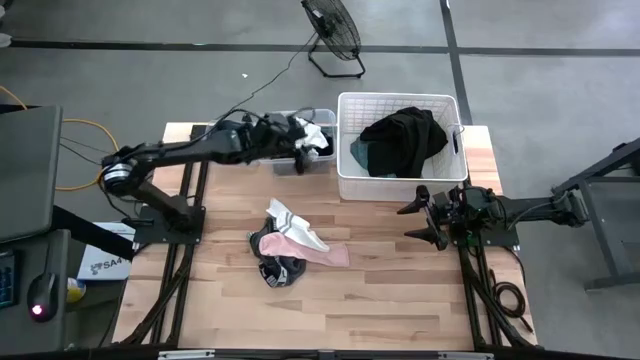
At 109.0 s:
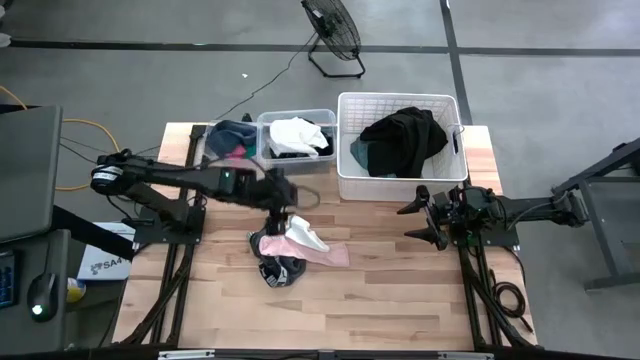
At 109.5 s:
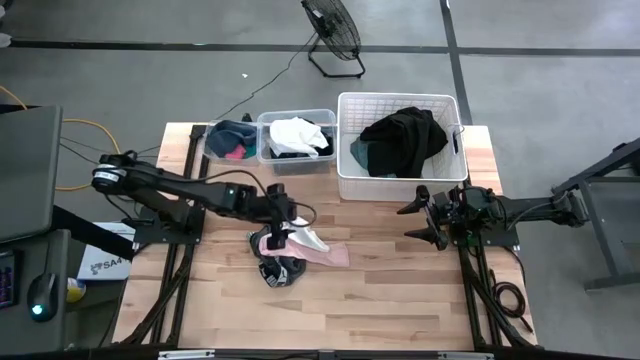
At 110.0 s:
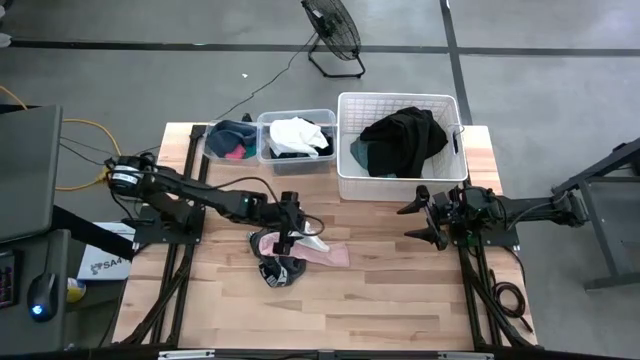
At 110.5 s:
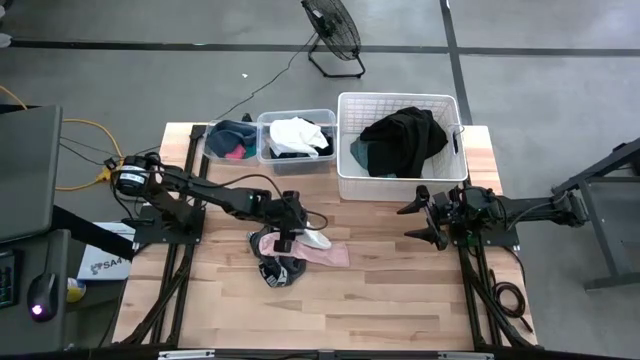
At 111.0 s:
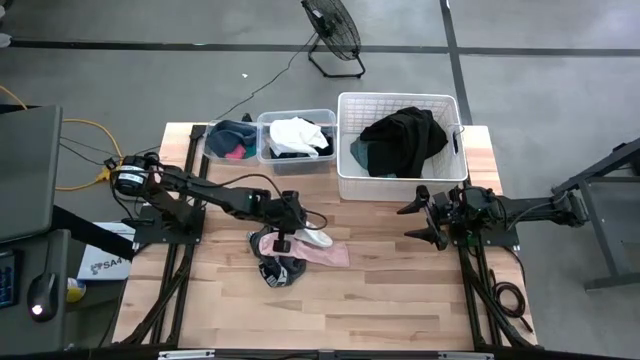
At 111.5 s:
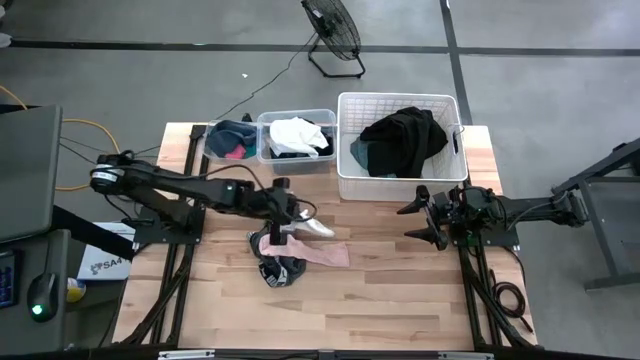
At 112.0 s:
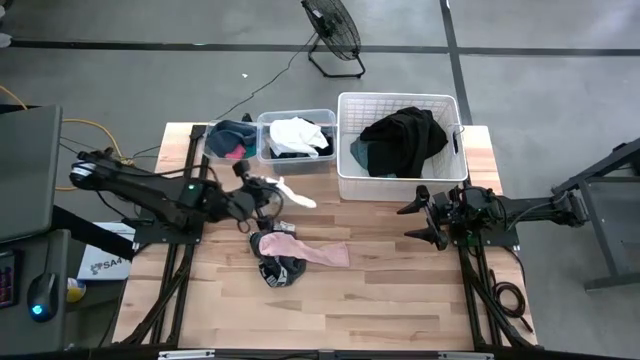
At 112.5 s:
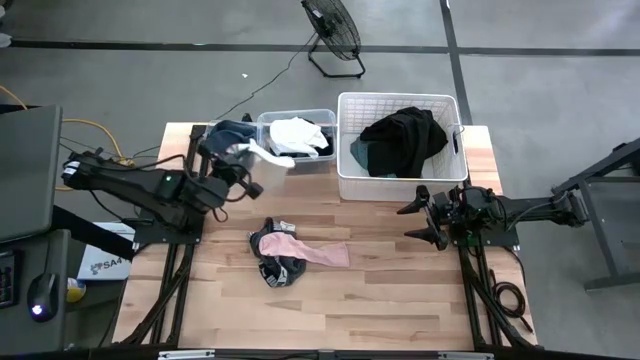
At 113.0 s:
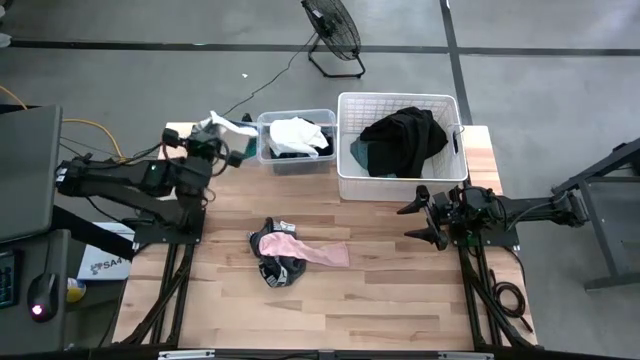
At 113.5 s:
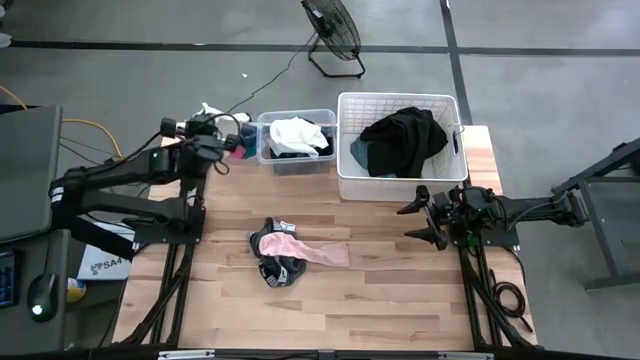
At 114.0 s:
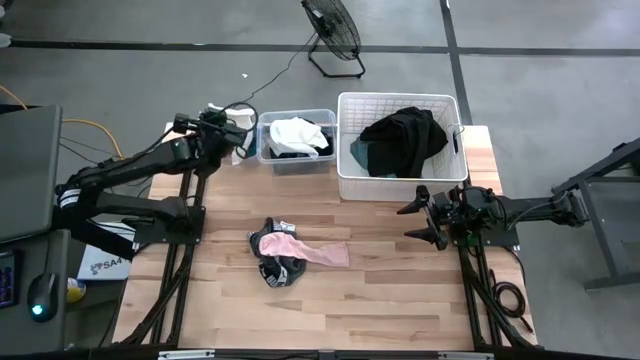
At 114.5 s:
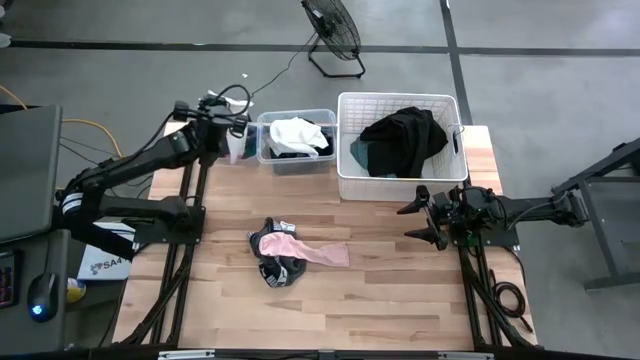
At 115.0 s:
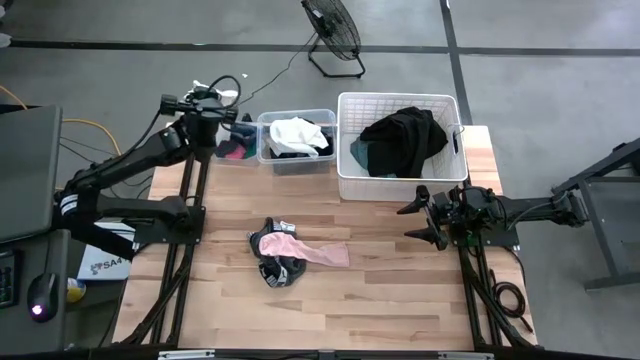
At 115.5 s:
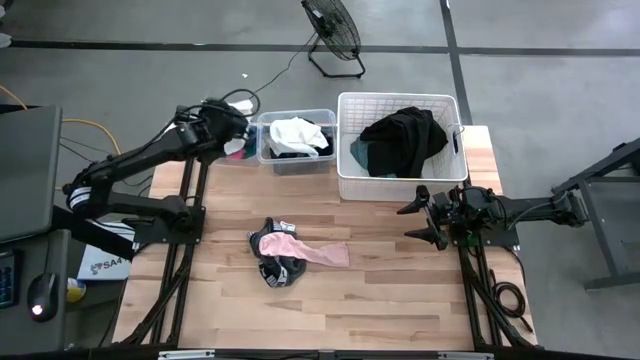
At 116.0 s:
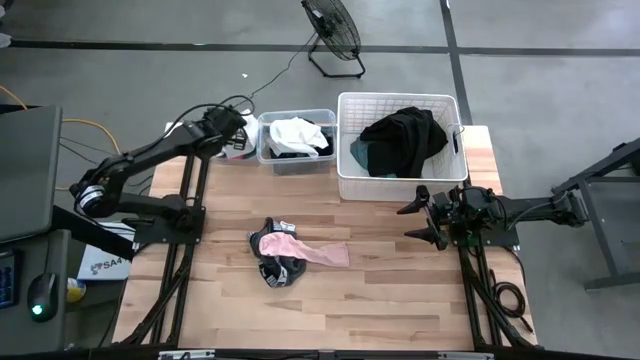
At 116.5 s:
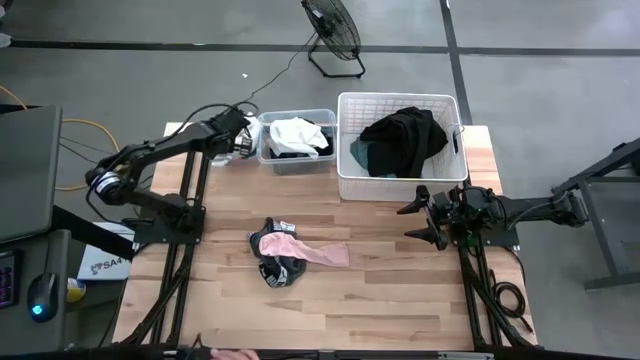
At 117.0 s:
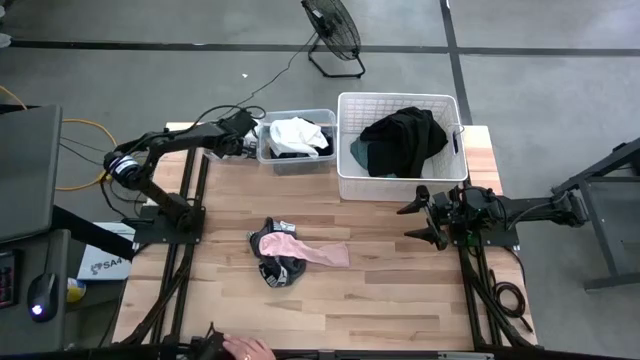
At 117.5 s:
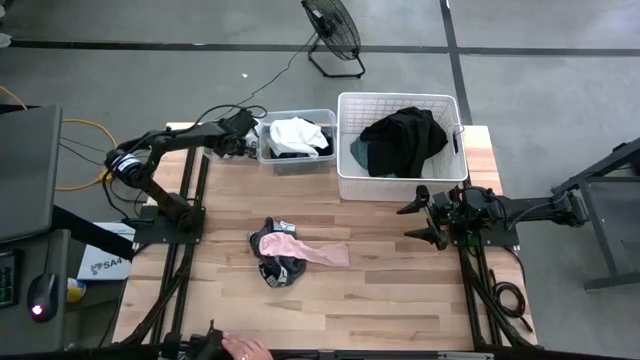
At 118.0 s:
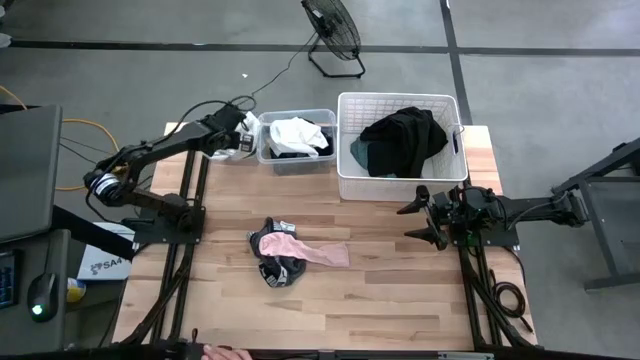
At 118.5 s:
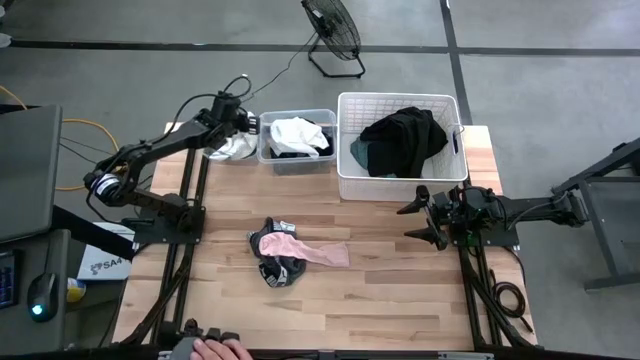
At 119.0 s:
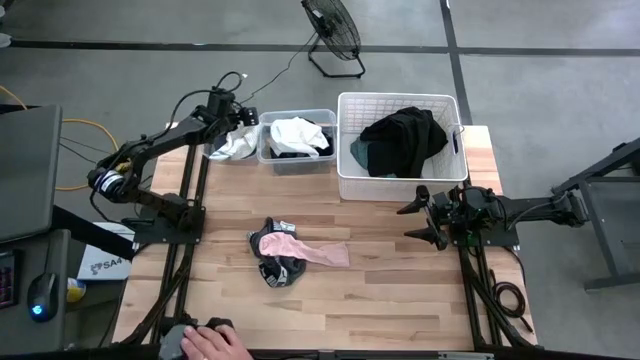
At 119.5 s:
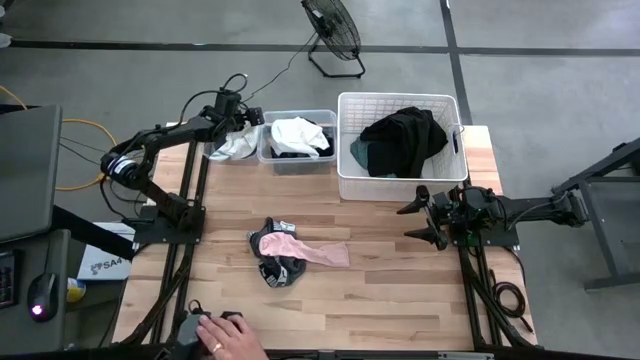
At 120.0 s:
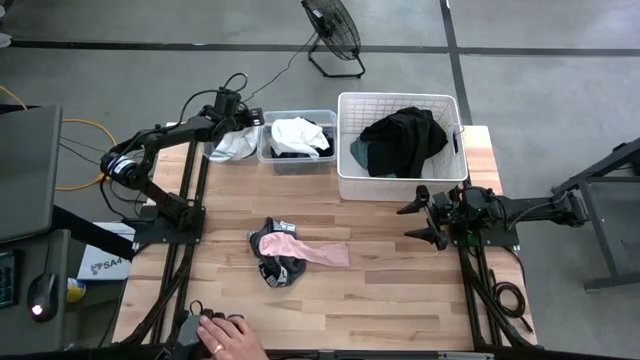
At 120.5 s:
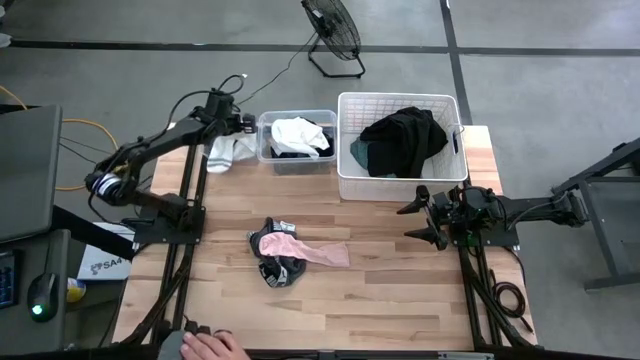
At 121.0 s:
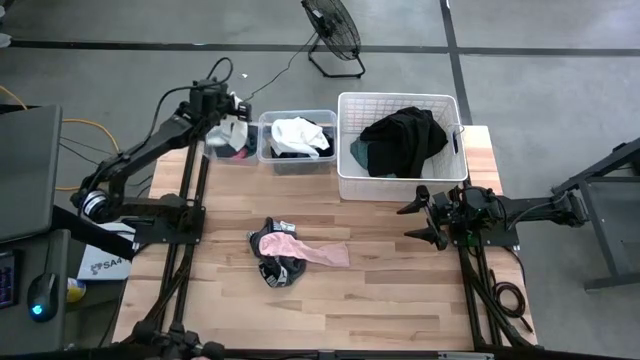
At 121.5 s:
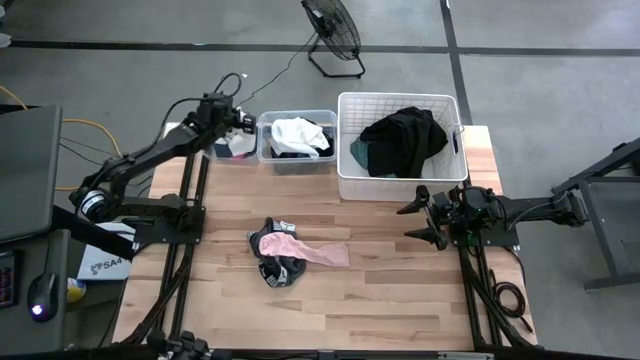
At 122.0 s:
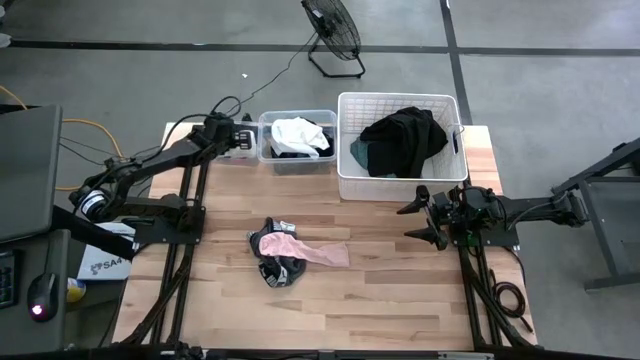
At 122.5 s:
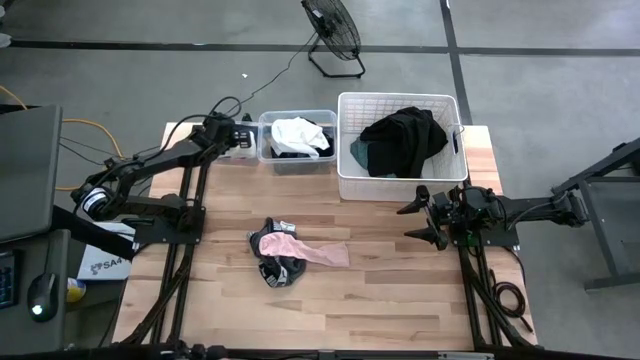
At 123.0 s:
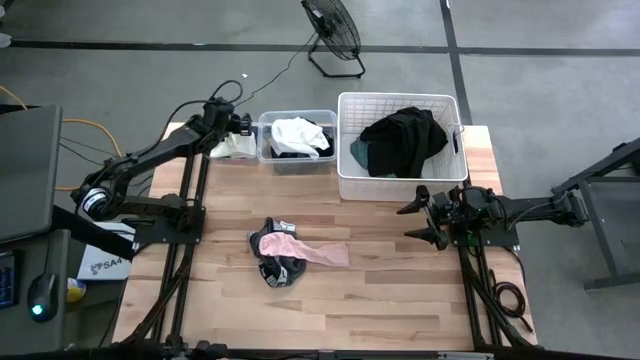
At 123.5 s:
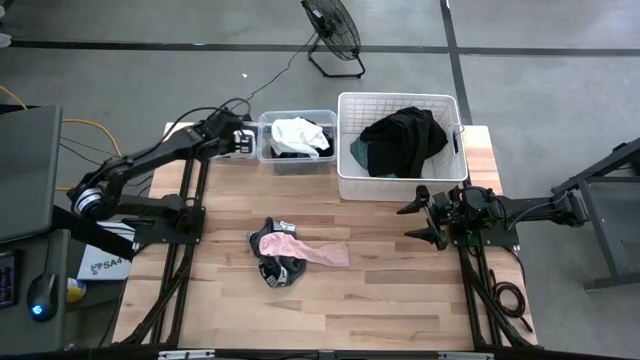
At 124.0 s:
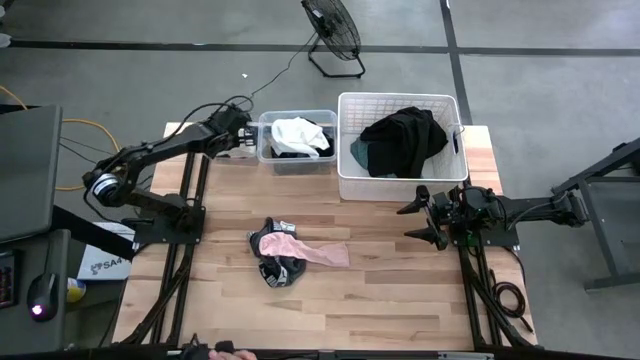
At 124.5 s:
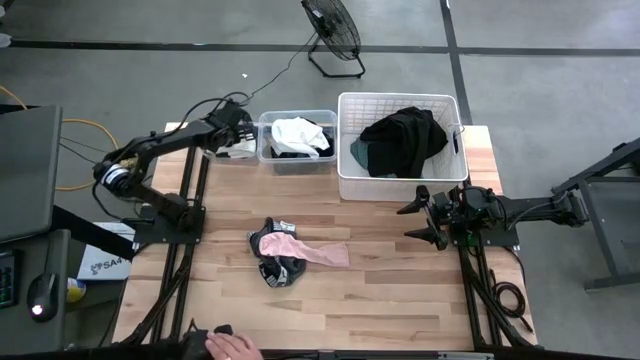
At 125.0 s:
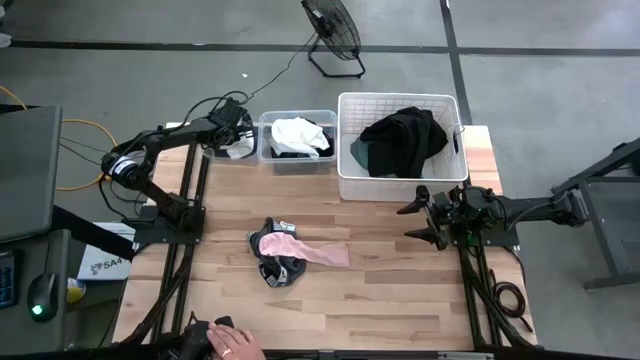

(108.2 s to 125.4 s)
Task: Pick & Place Cloths
Put the white sock into the left transparent bin

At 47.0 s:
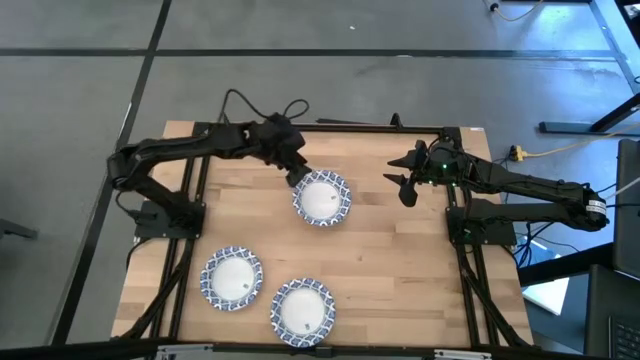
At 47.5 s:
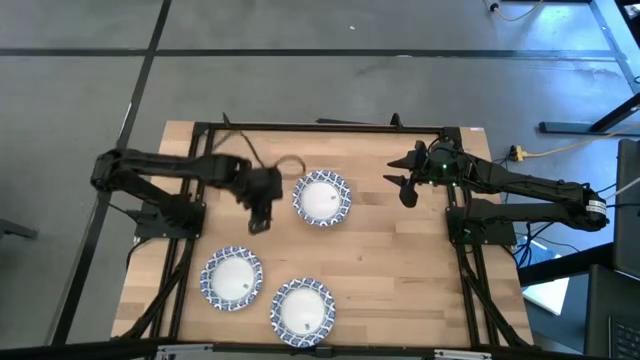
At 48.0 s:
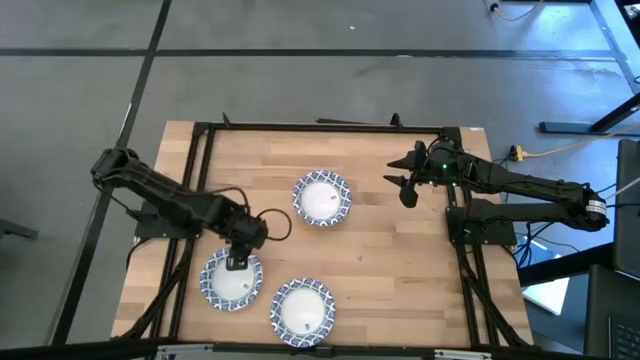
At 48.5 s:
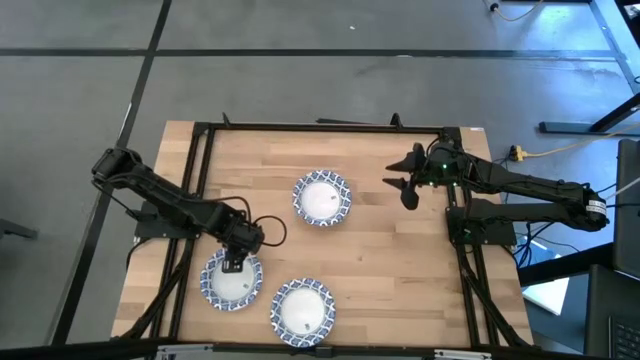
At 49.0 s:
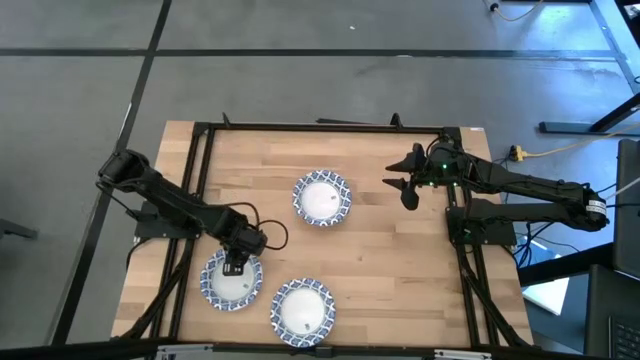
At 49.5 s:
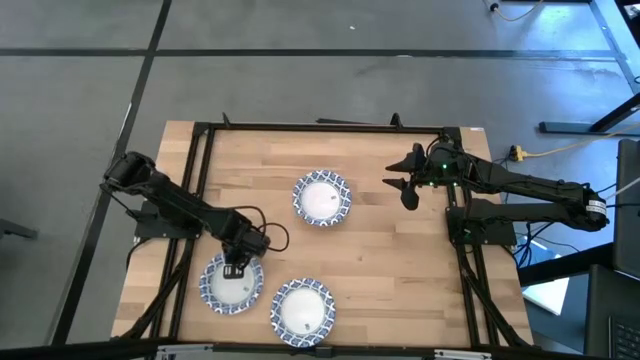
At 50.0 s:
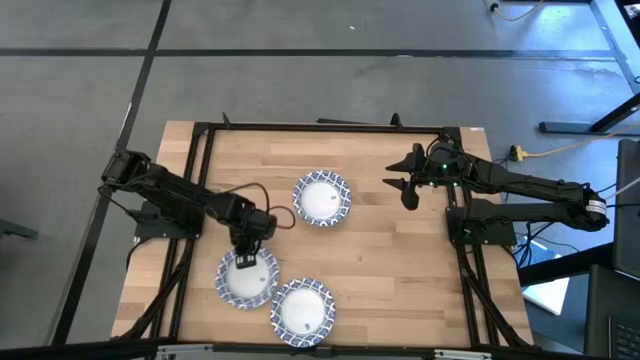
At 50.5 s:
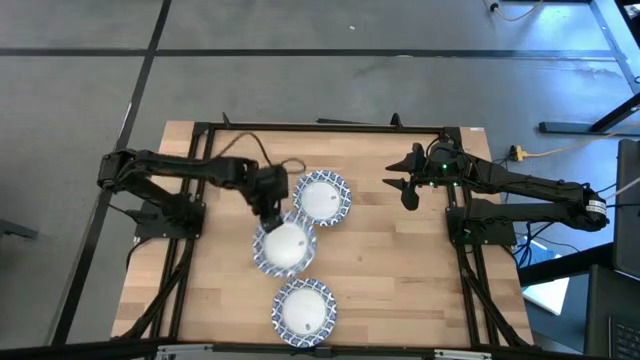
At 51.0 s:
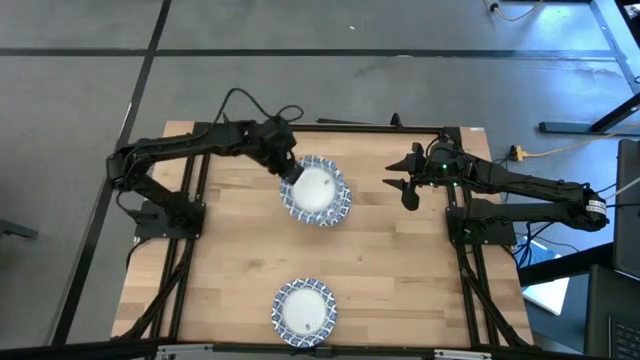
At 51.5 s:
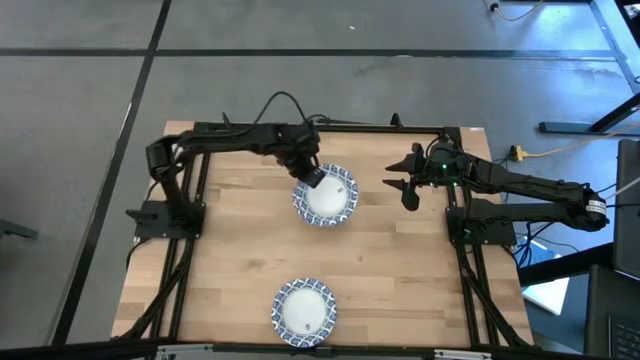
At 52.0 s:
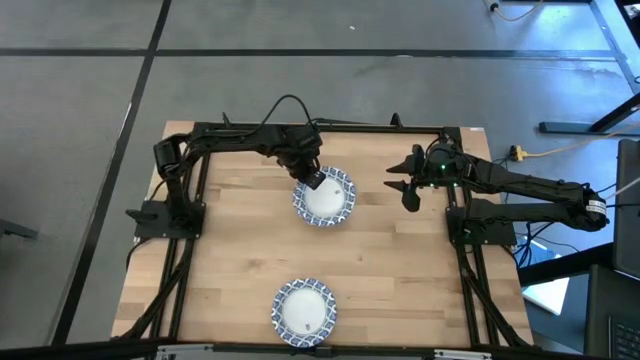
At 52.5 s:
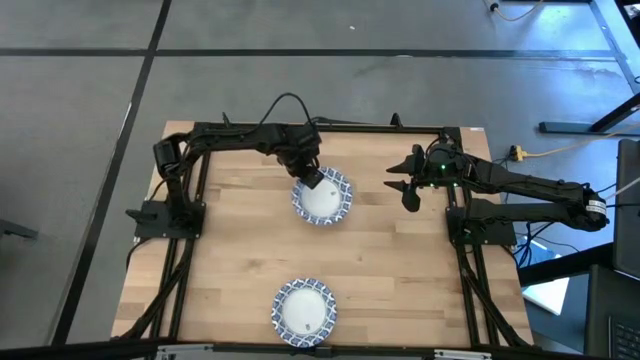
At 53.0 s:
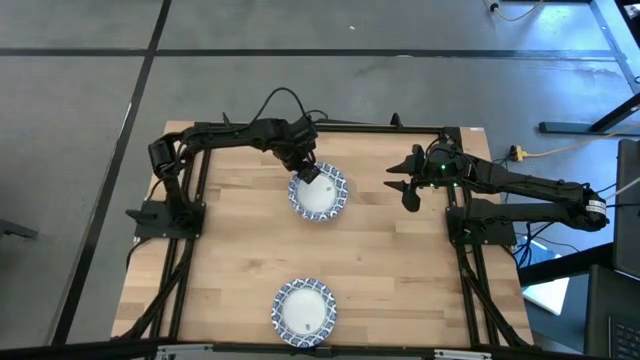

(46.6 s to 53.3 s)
Task: Nest bowls inside each other
Stack the blue patterned bowl on the stacked blue patterned bowls
